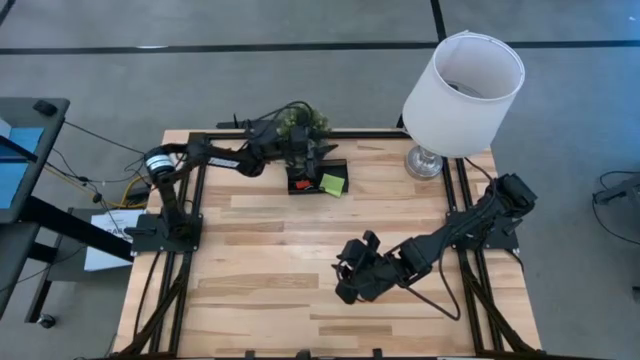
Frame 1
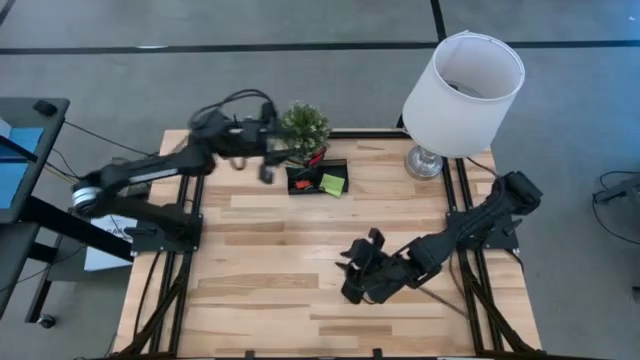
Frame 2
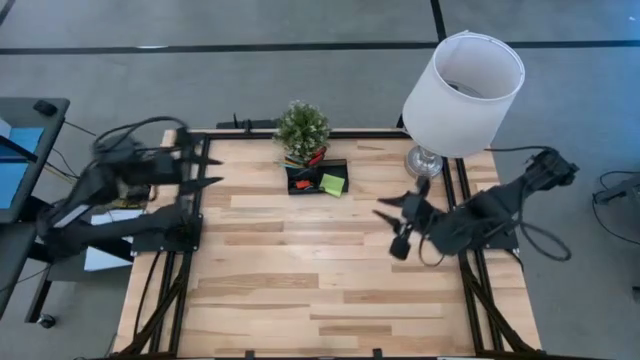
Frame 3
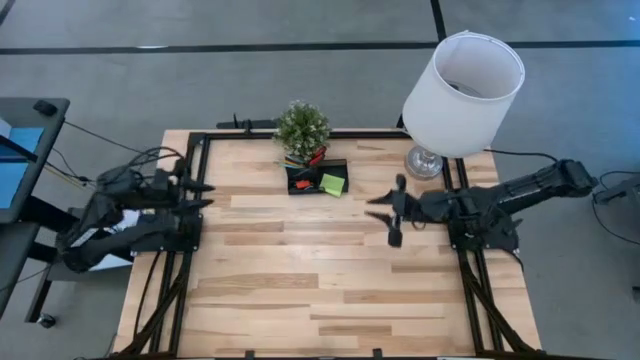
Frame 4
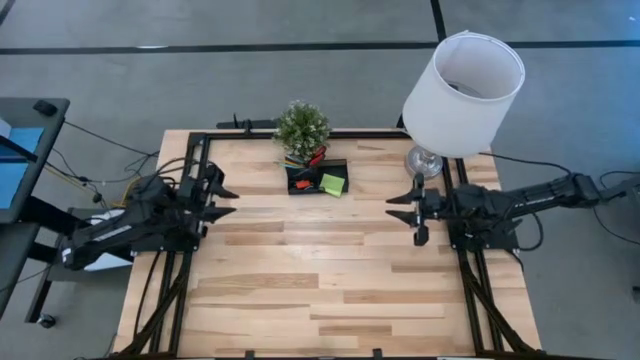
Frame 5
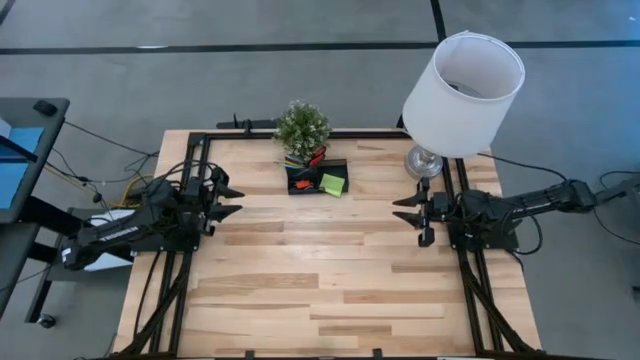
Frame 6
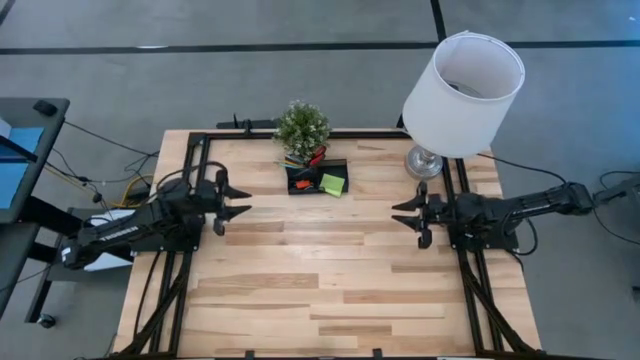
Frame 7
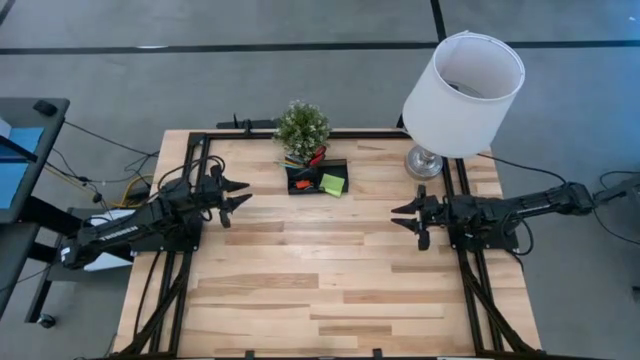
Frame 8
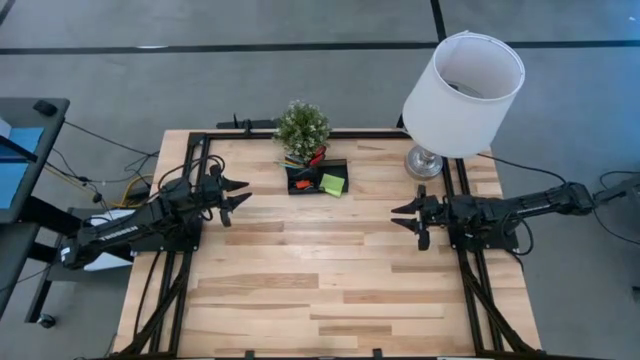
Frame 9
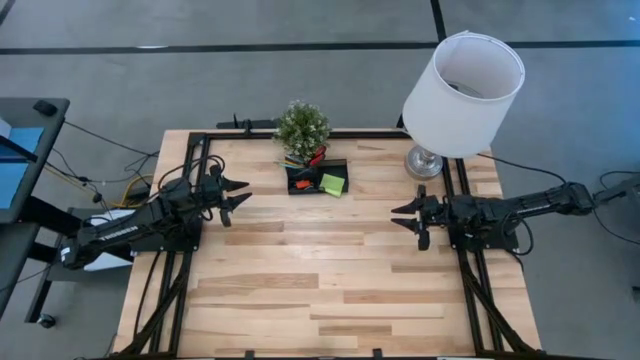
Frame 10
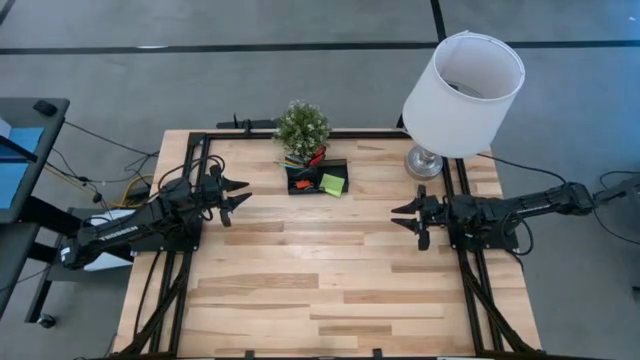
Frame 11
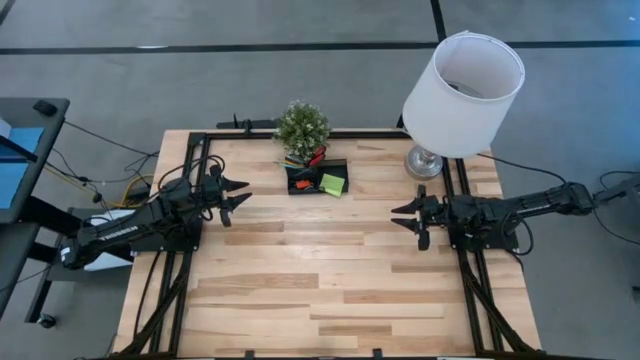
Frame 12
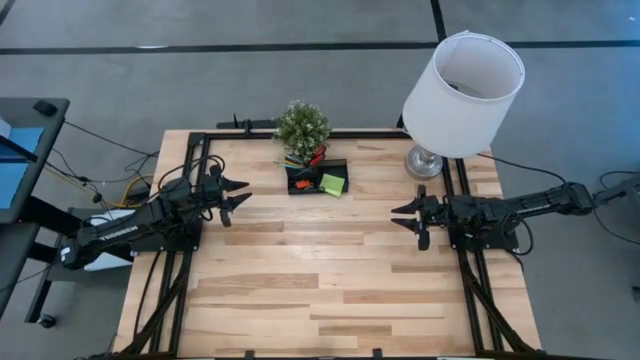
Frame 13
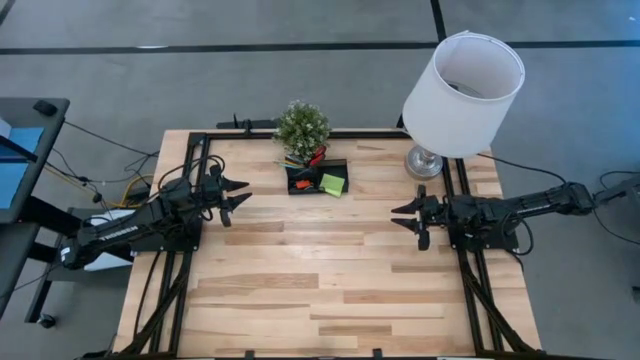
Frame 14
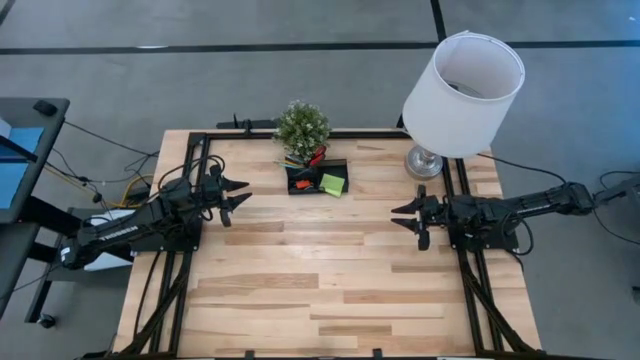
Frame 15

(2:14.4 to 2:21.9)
Task: Pick and place office supplies into organizer
Return to Home Position

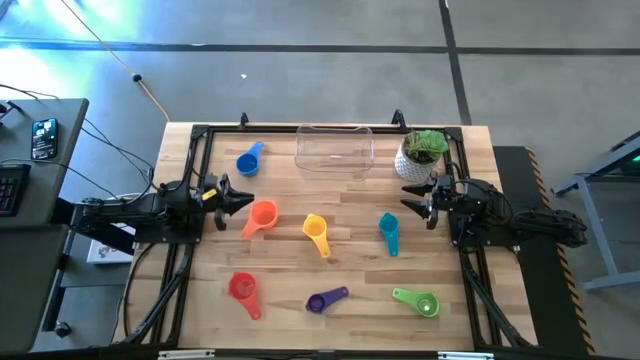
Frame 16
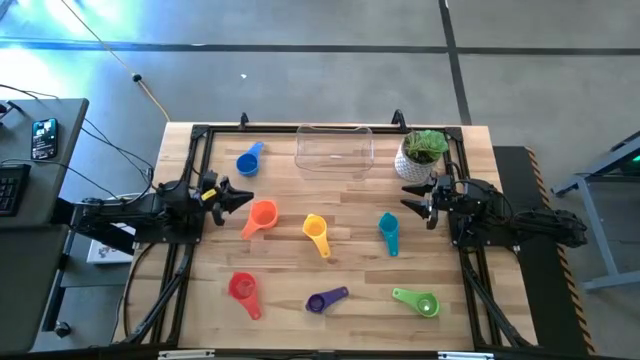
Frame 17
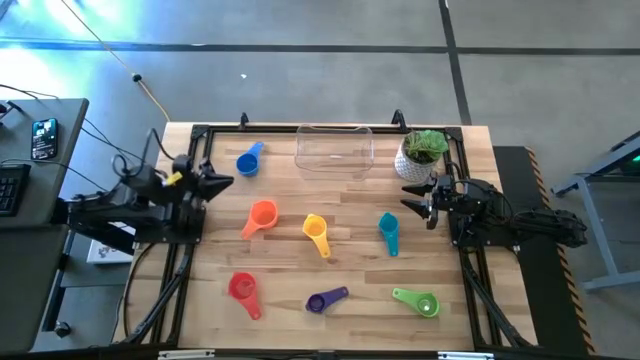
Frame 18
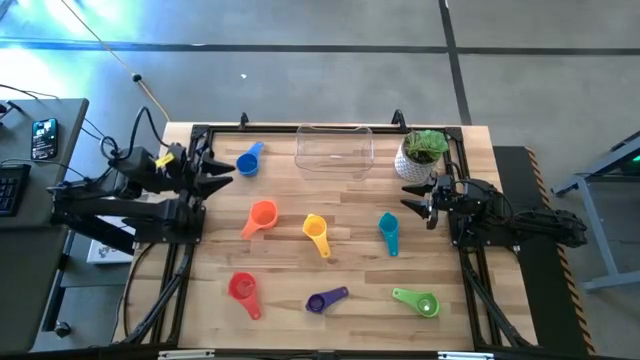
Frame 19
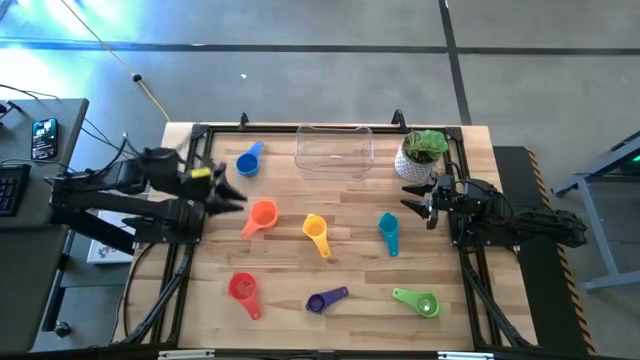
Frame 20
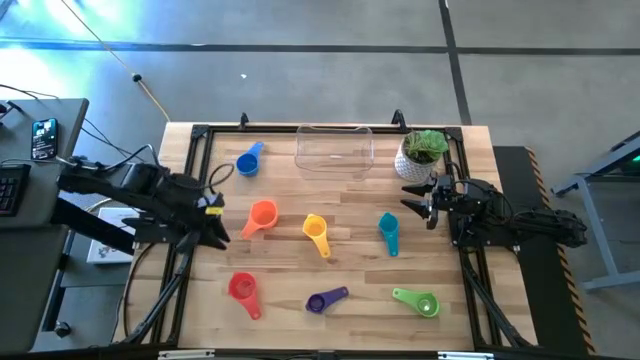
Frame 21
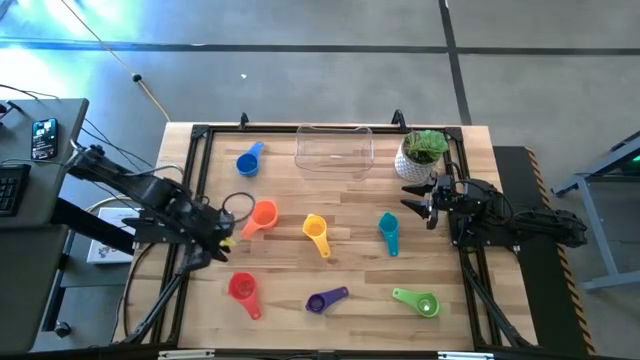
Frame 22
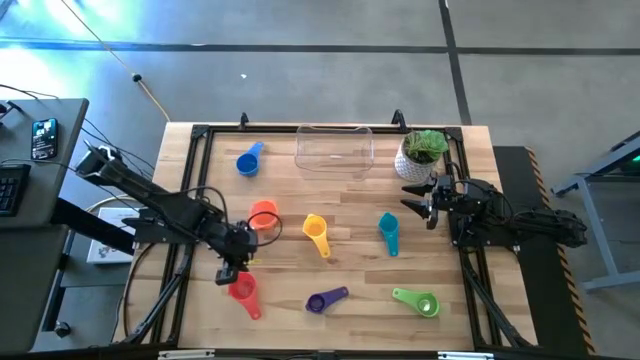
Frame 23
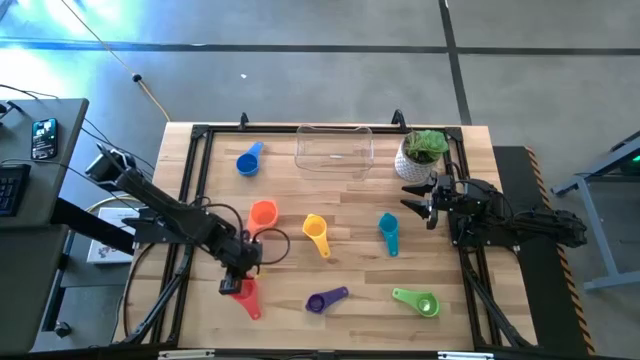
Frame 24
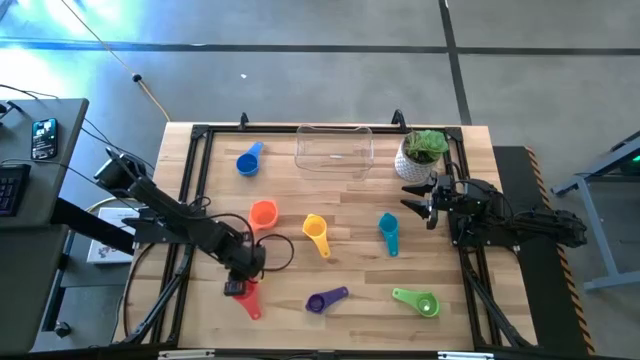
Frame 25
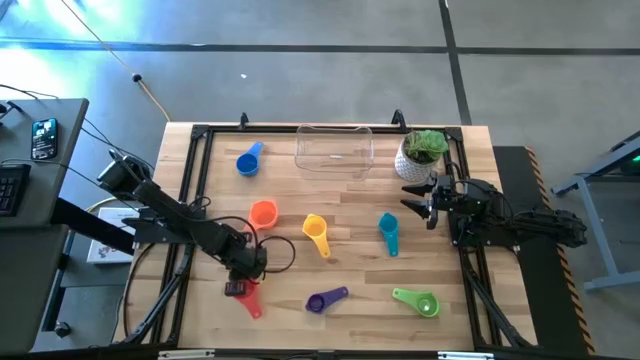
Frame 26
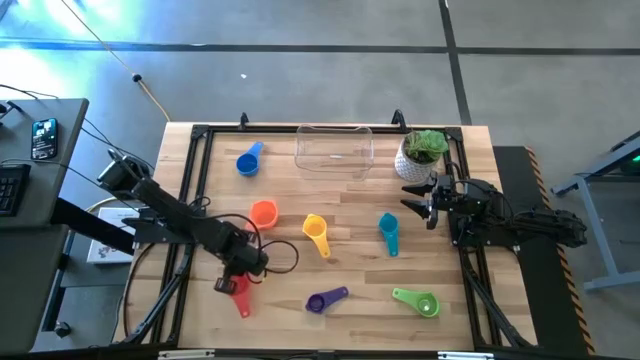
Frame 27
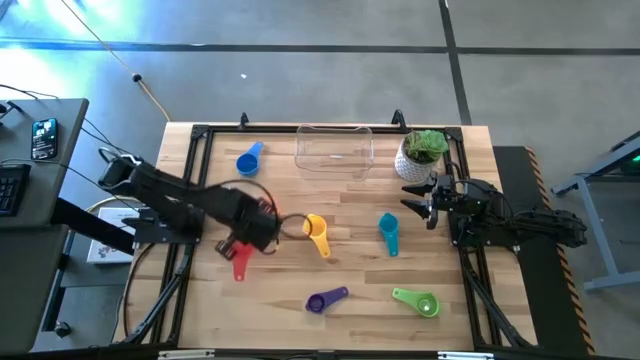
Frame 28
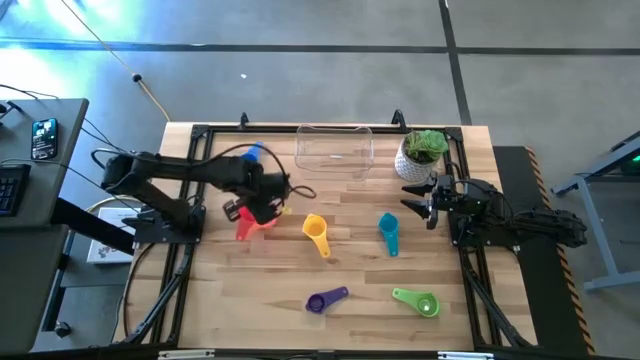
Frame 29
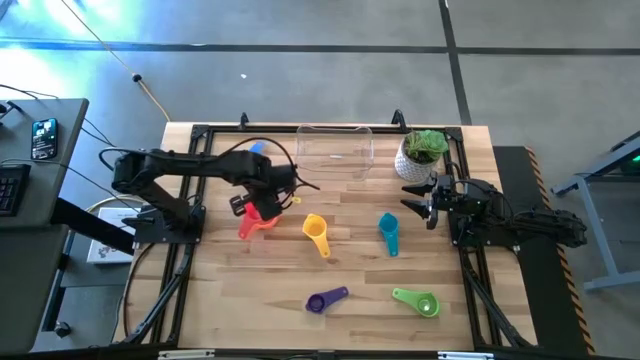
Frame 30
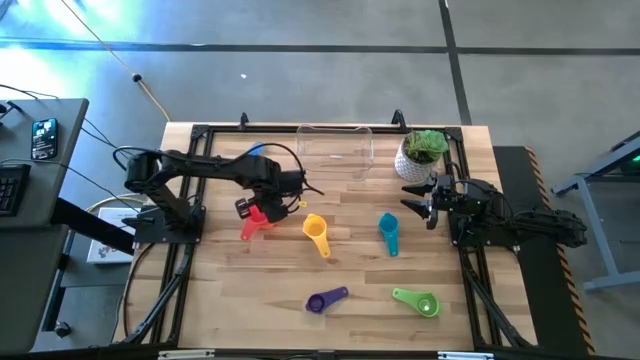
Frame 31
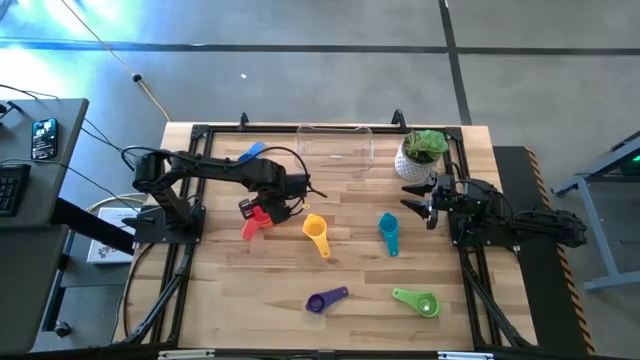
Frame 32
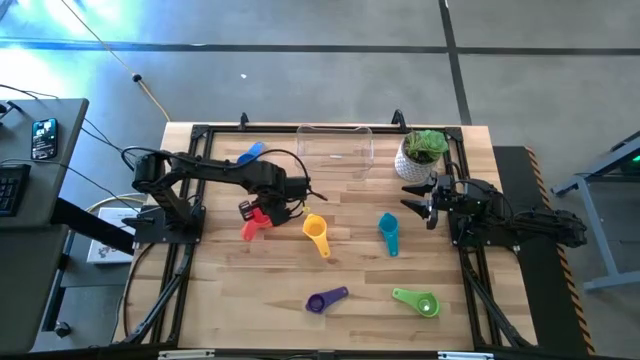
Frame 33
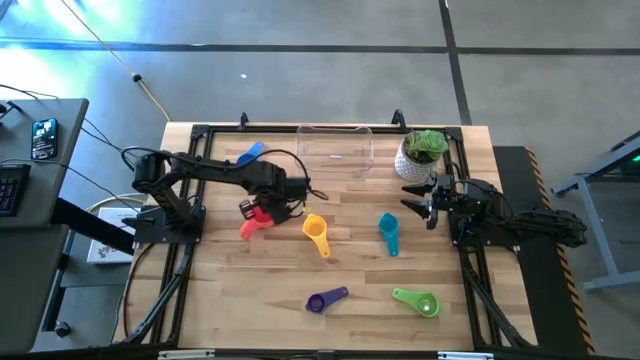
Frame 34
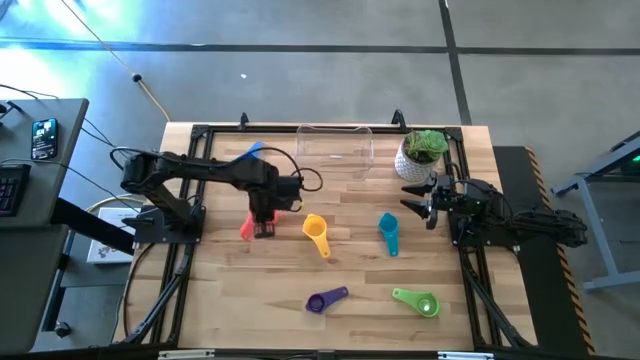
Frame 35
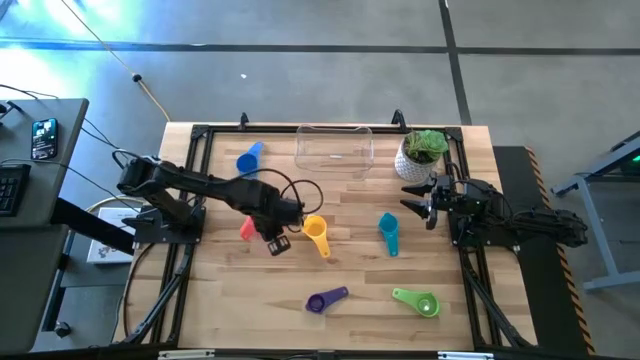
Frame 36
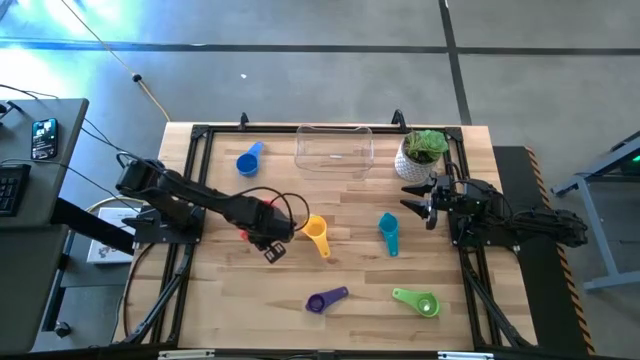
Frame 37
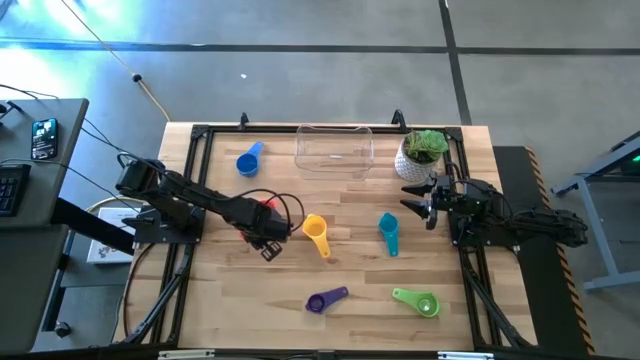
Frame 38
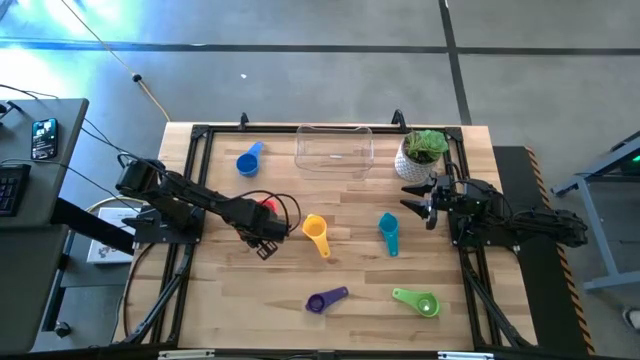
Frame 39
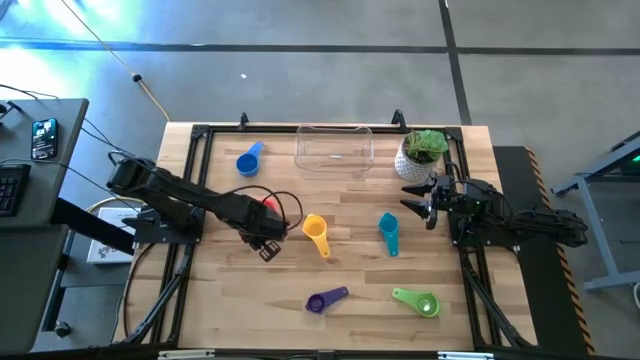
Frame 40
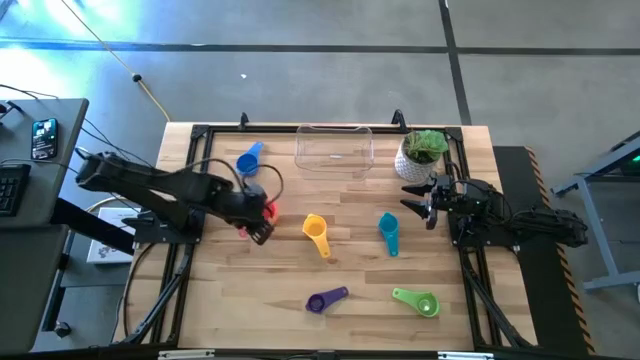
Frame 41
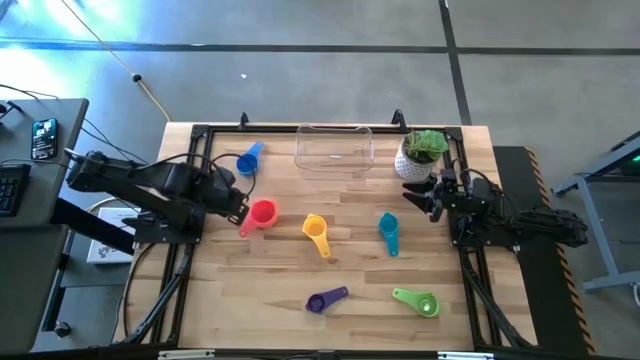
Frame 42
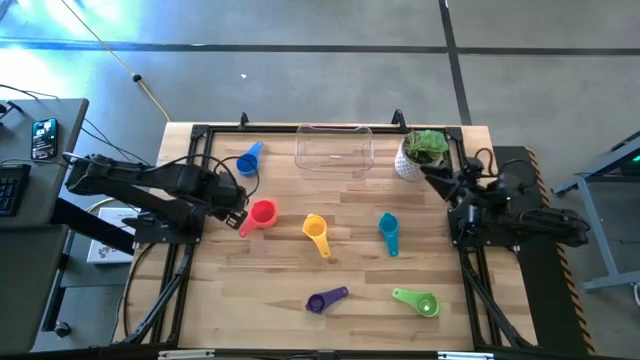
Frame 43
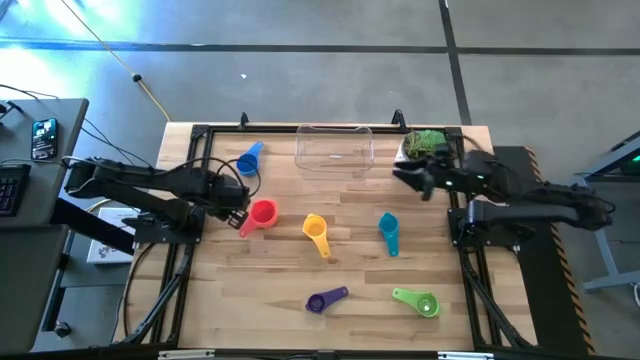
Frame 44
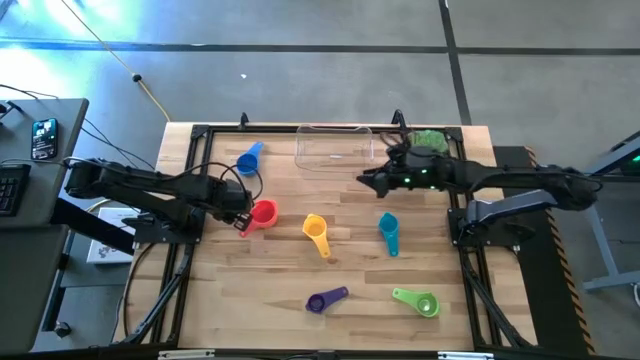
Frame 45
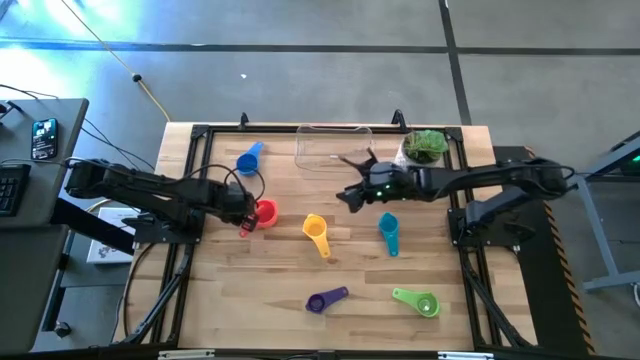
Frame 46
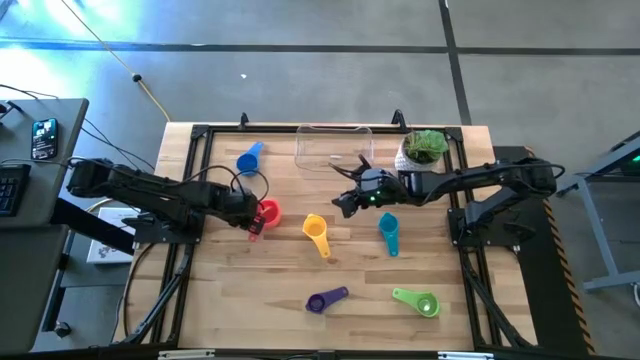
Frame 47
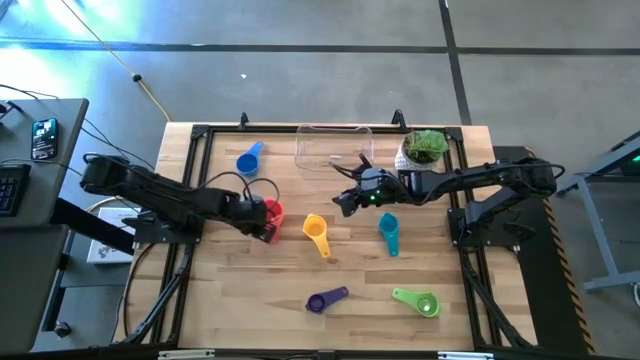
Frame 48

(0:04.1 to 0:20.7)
Task: Nest measuring cups in basket
Stack the red measuring cup on the top of the orange measuring cup
